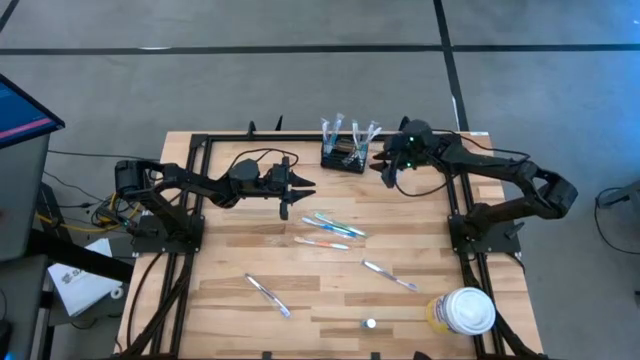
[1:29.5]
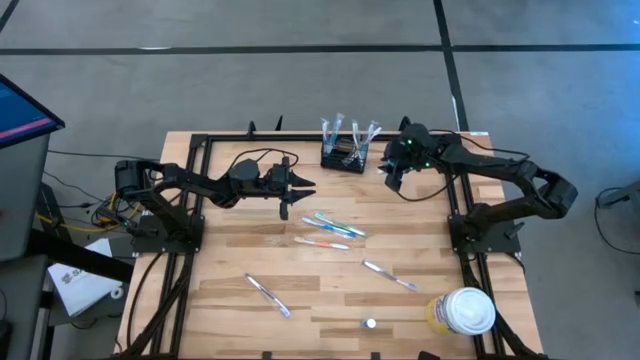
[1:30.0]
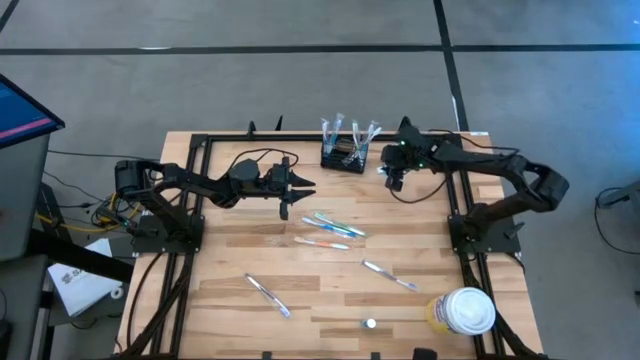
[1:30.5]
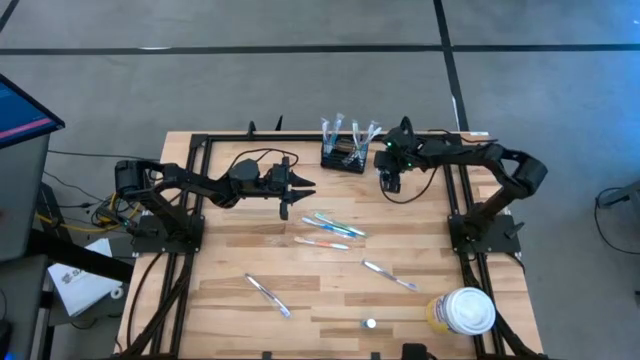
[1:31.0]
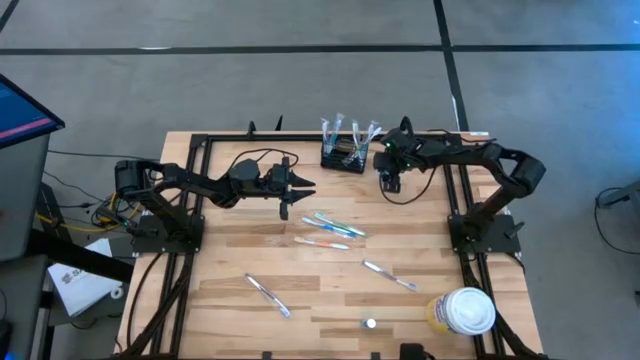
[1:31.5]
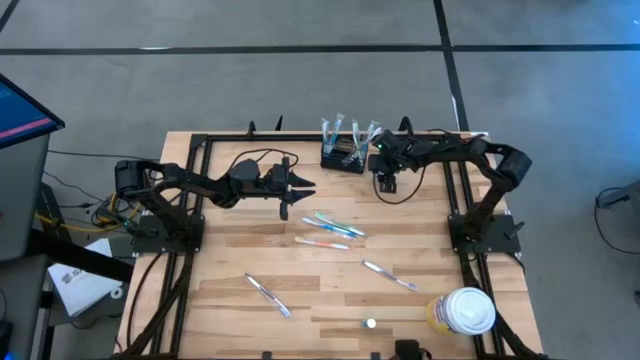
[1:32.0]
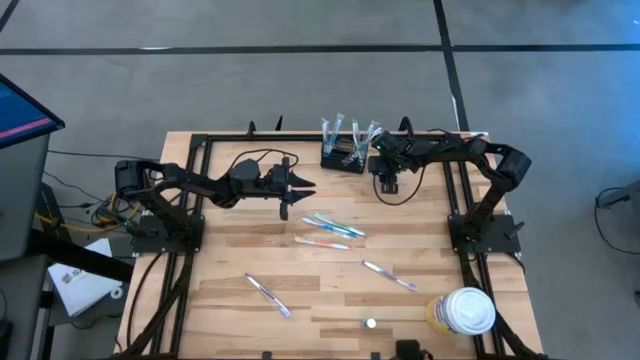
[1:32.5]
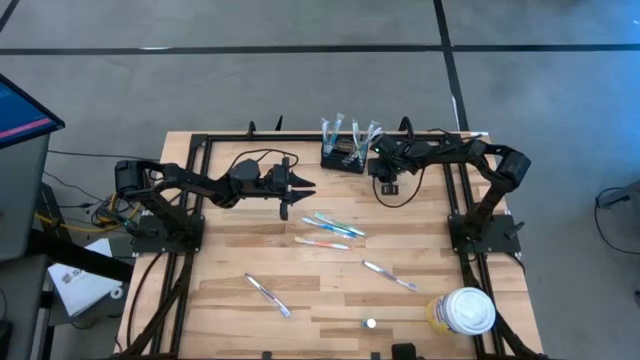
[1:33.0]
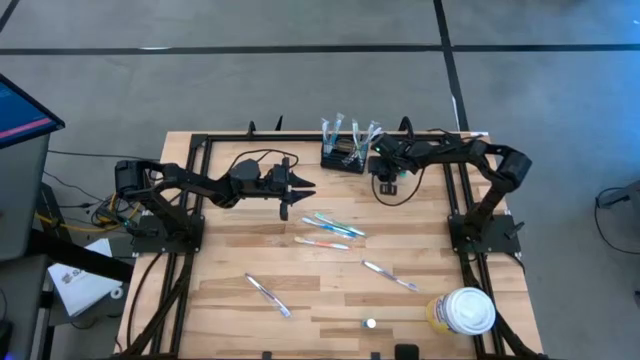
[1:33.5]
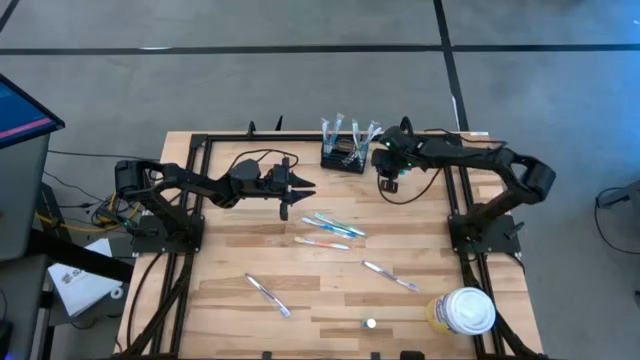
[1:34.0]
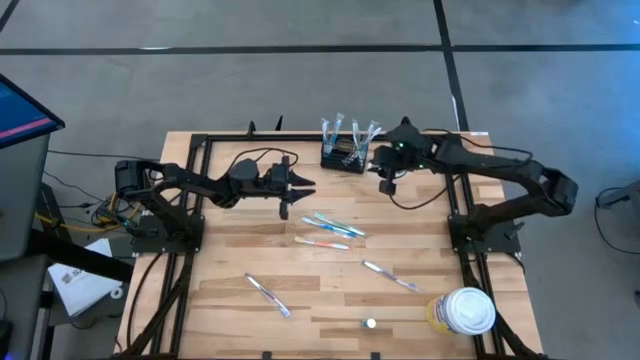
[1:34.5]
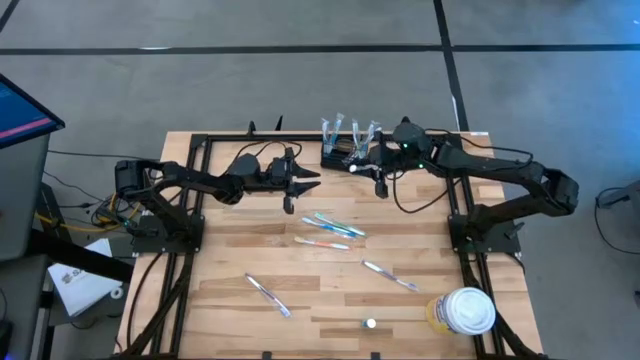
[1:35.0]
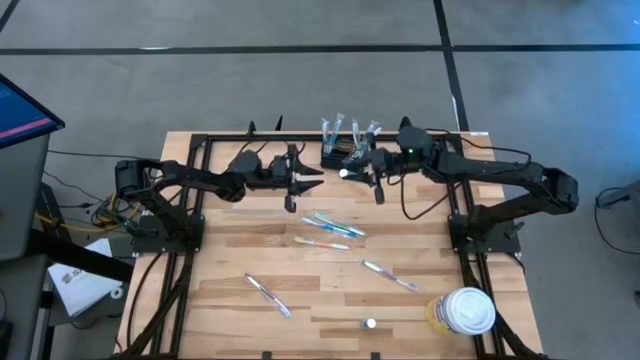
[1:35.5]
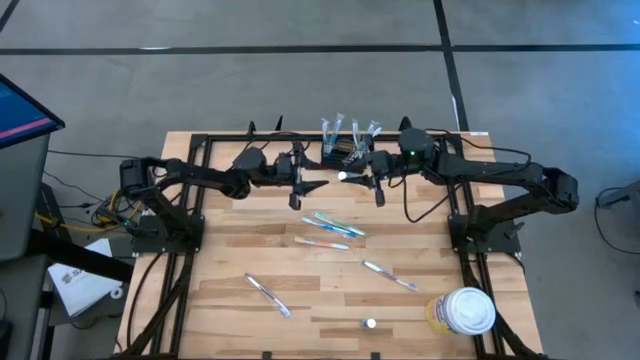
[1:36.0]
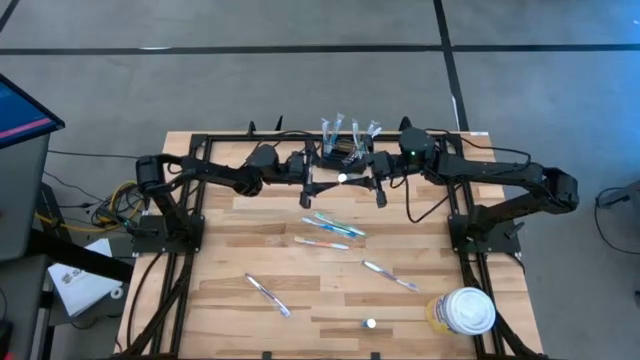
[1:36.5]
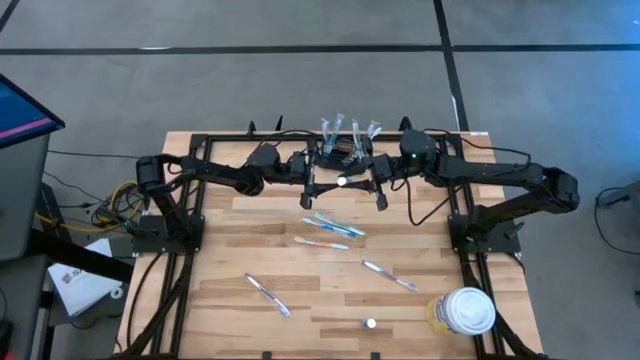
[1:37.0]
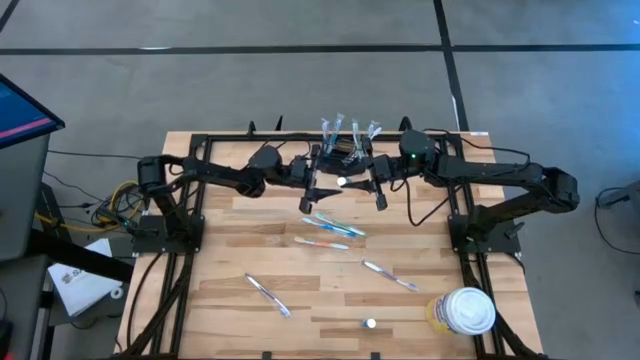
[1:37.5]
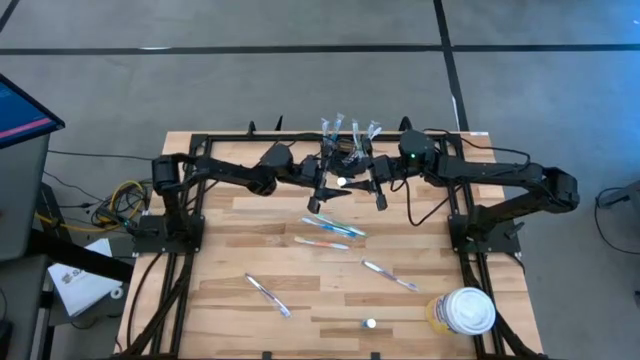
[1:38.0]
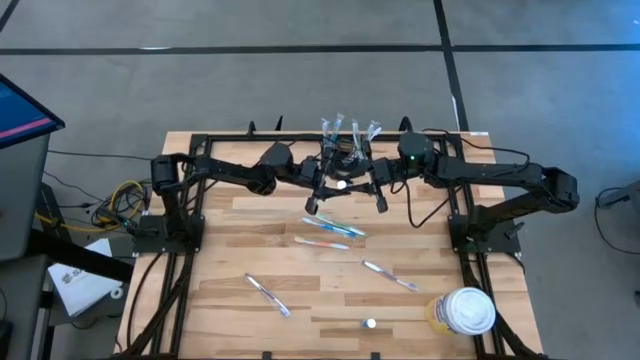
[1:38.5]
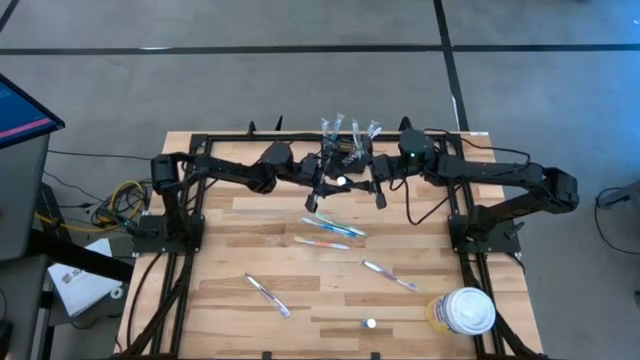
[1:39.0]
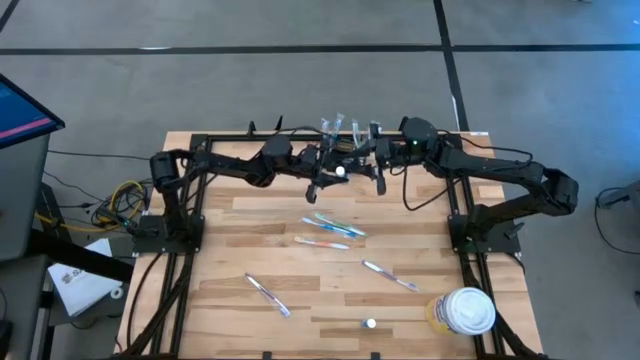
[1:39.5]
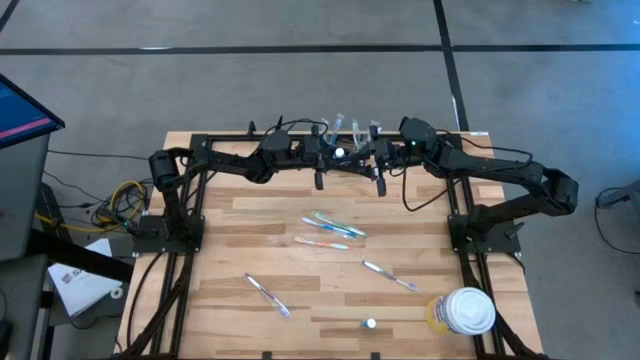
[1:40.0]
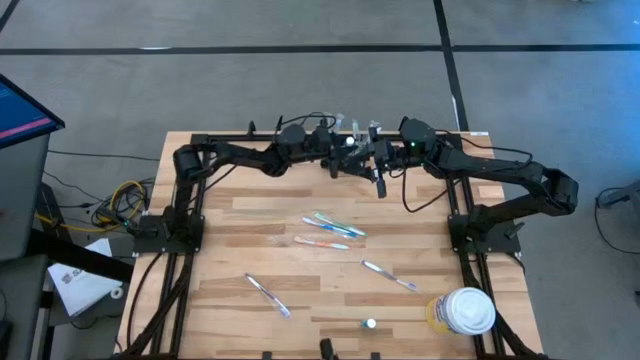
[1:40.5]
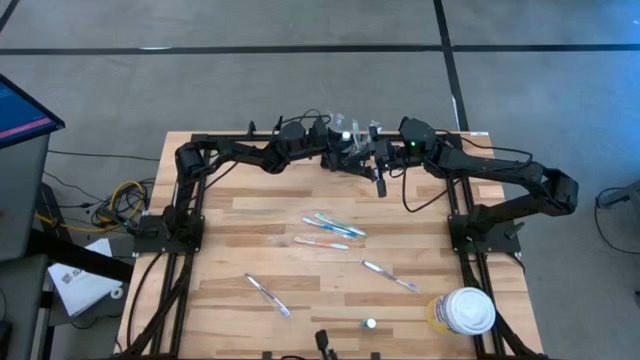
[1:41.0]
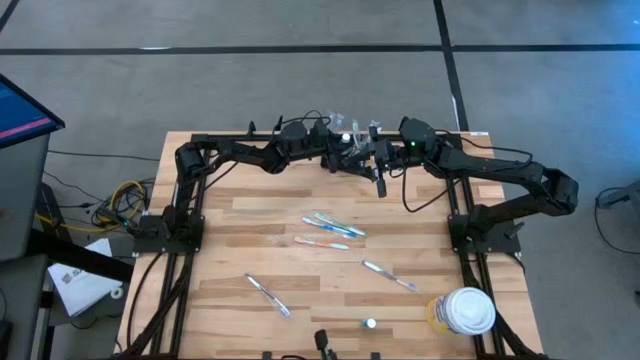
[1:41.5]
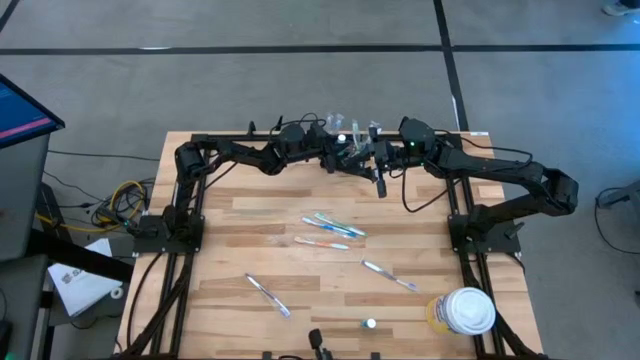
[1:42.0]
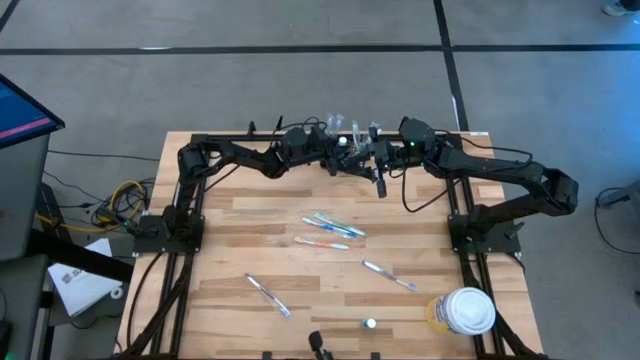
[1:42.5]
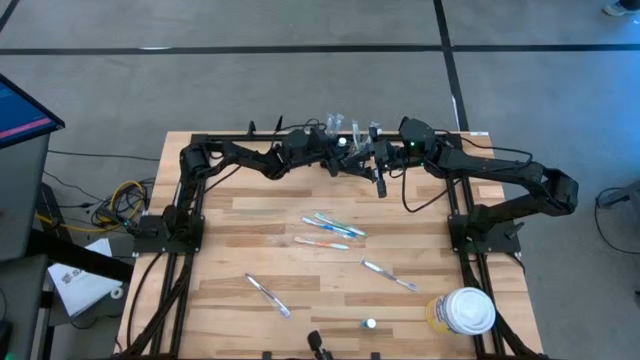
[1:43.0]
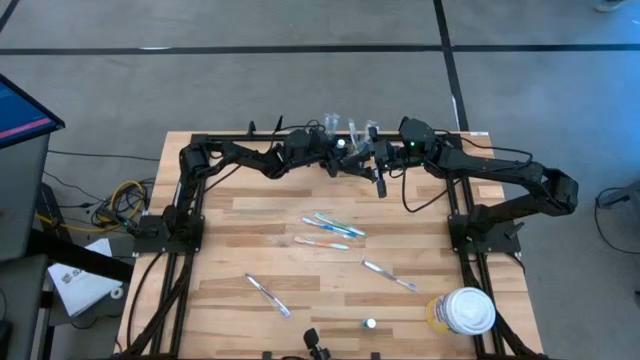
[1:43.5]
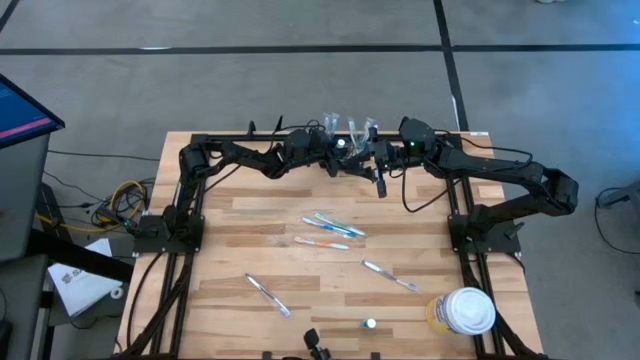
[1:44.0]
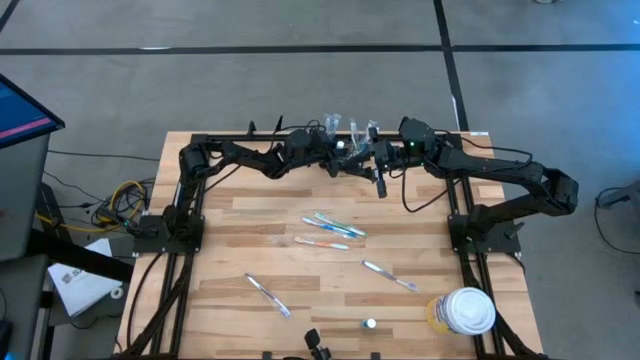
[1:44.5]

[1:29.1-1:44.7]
Task: Pick & Place toothbrushing station
Put the top blue mouthwash into the mesh organizer
